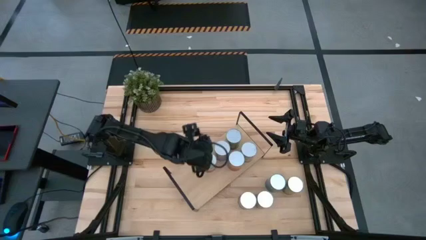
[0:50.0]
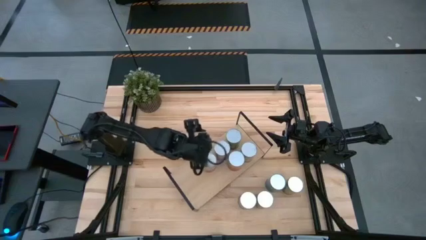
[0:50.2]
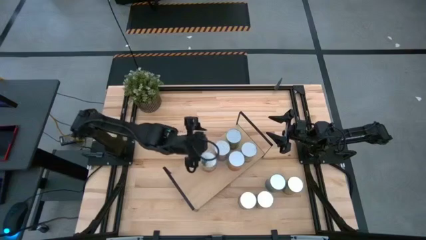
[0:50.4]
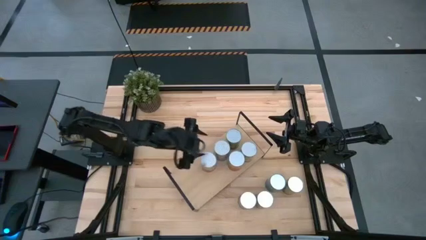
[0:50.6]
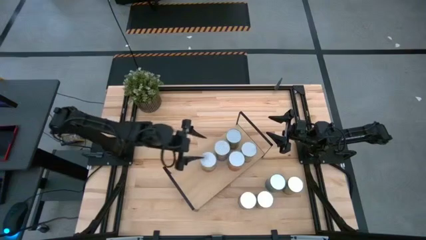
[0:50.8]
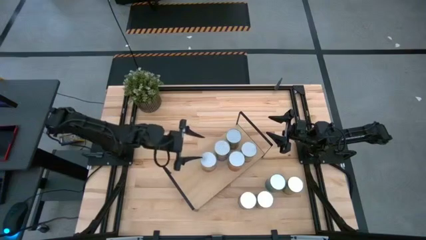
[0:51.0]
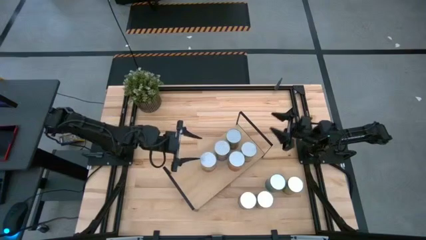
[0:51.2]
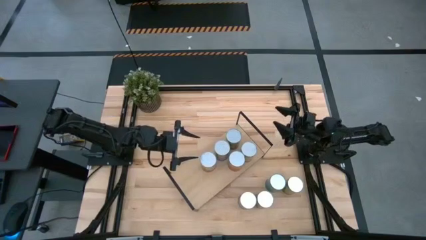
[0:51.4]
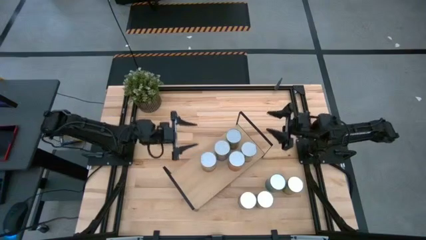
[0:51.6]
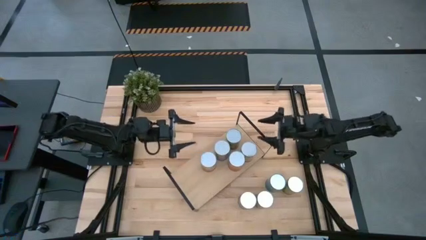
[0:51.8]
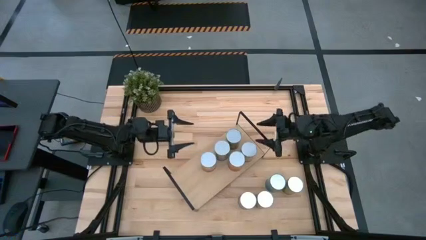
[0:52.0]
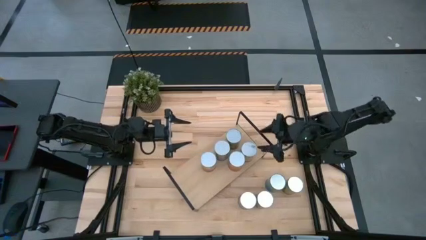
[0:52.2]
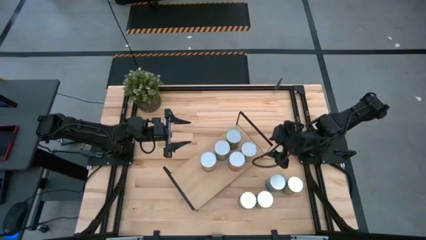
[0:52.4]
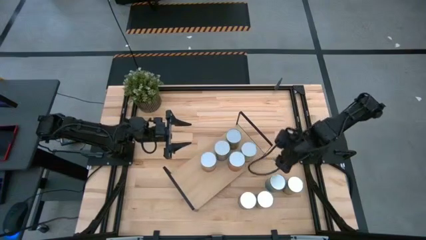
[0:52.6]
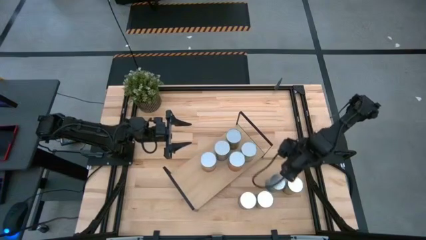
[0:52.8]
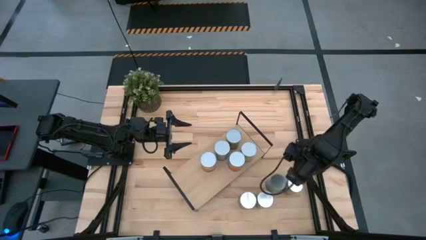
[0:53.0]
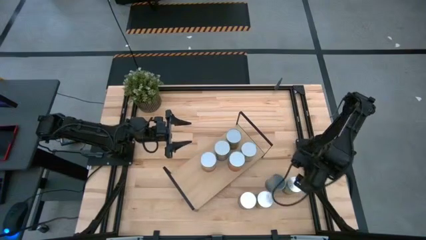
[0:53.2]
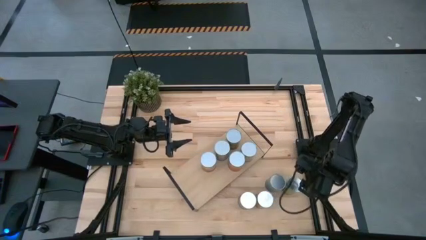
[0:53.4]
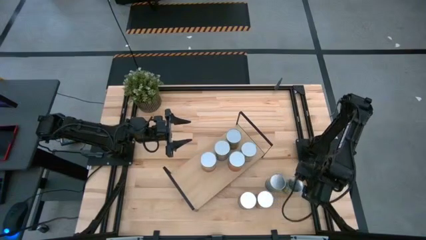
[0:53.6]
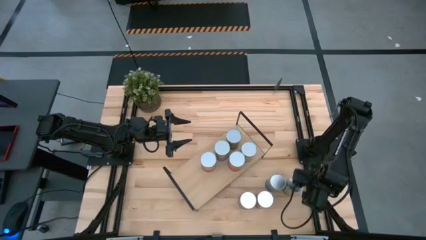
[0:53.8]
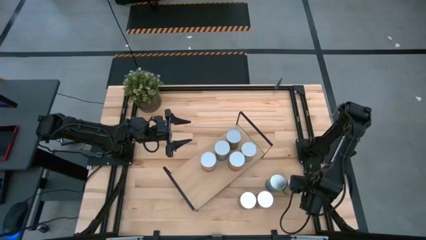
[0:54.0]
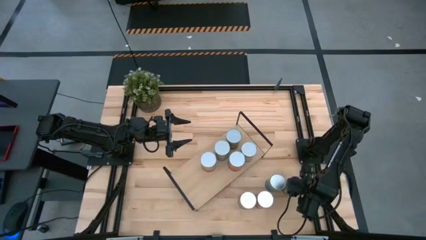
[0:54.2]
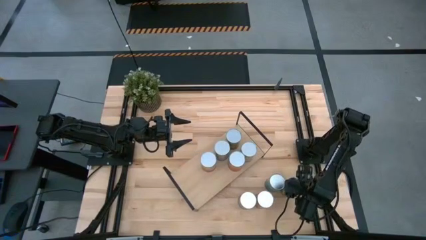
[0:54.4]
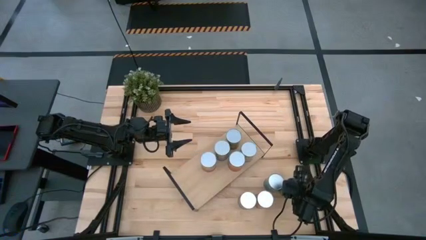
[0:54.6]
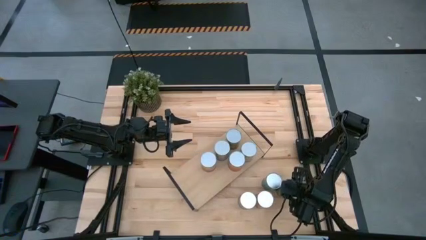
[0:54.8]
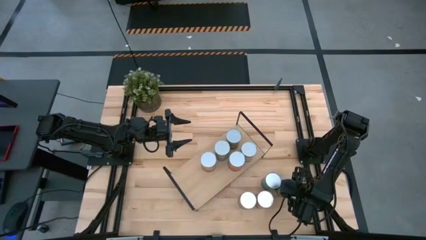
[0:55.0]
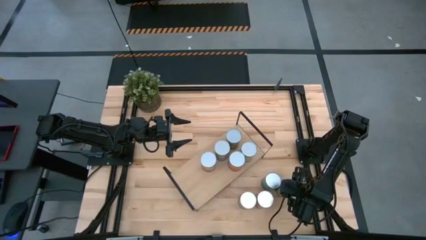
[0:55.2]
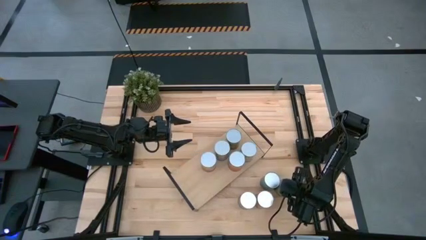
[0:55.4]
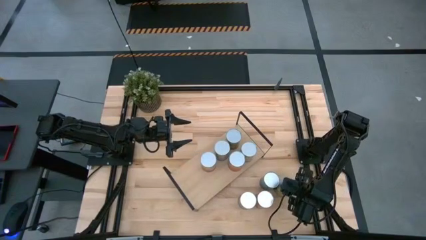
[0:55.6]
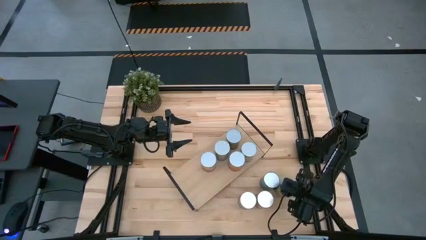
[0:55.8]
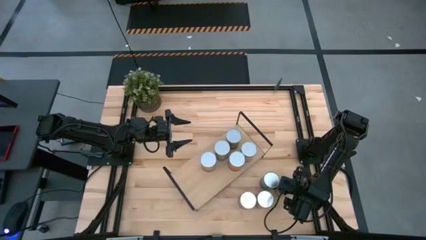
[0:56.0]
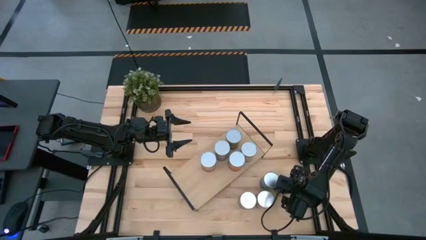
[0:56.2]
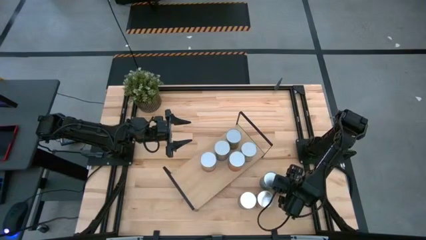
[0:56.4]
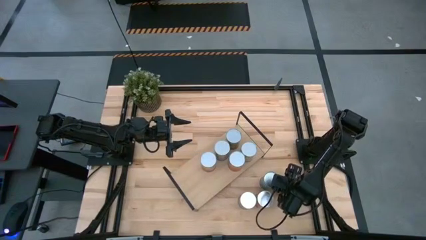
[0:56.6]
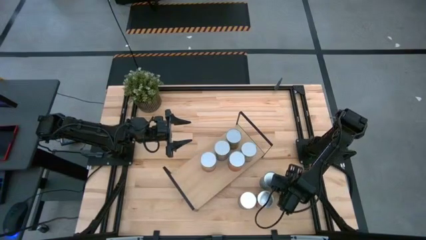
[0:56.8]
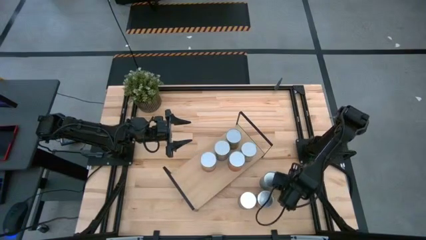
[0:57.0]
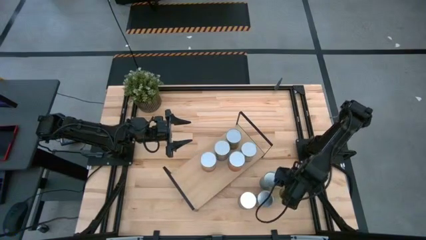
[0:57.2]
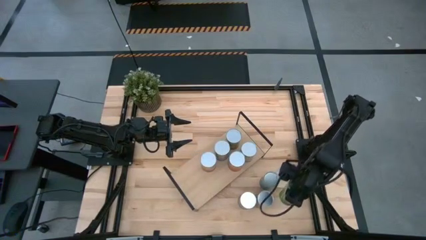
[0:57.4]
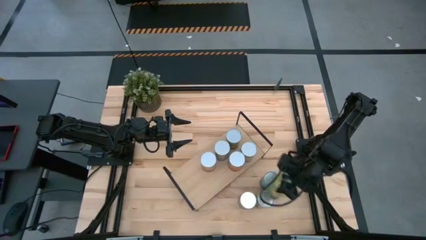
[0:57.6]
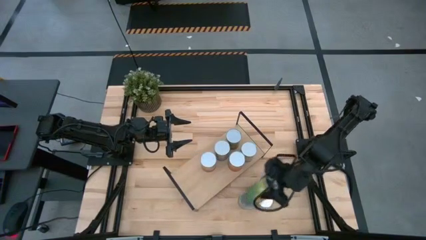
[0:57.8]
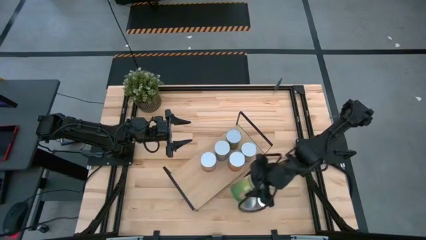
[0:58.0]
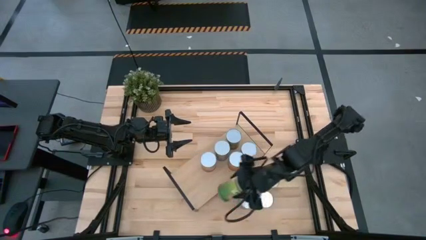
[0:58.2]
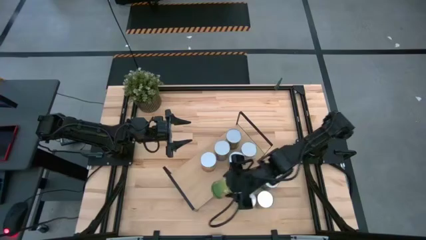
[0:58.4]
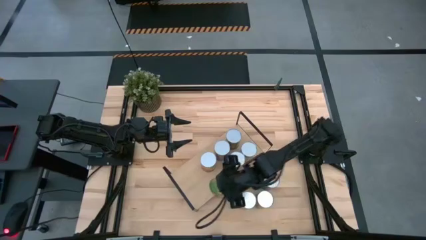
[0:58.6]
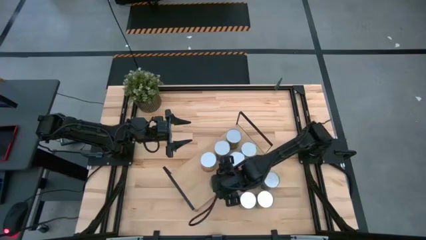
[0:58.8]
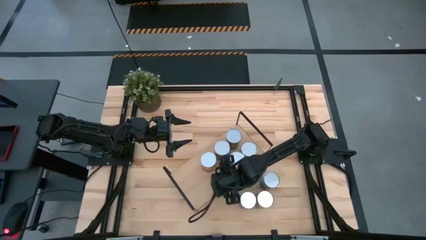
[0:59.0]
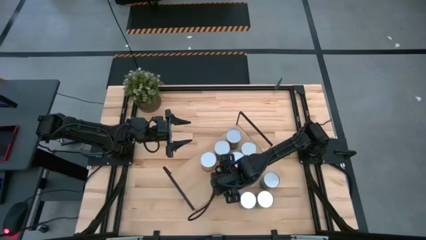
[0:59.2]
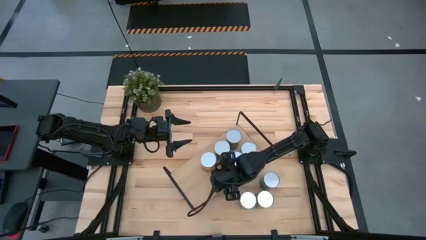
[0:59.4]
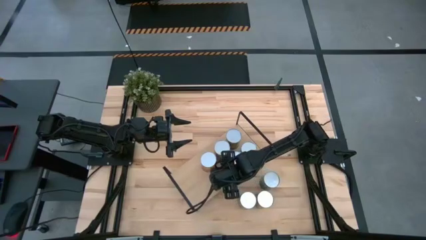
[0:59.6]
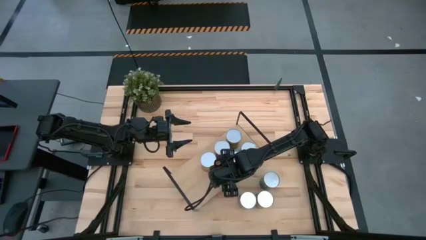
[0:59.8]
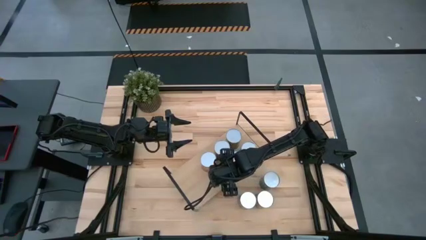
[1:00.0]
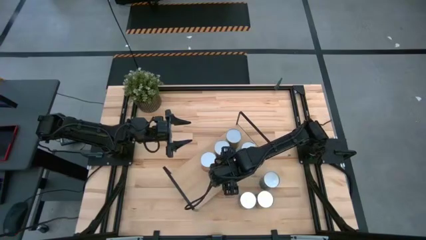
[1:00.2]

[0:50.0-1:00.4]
Task: Pick and place cans onto a shelf
Put the canned oranges on the shelf

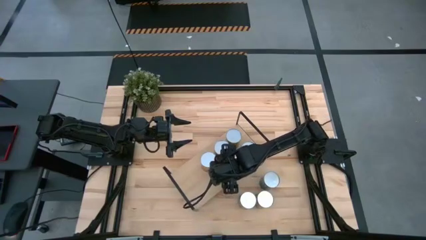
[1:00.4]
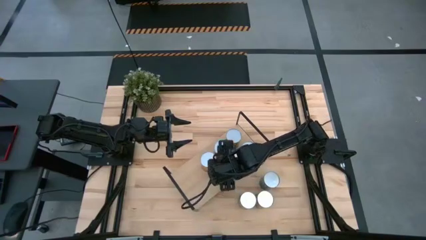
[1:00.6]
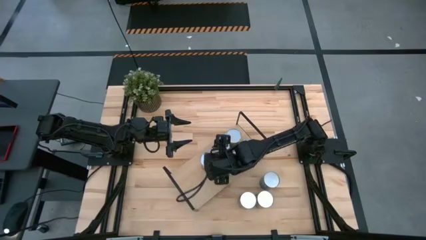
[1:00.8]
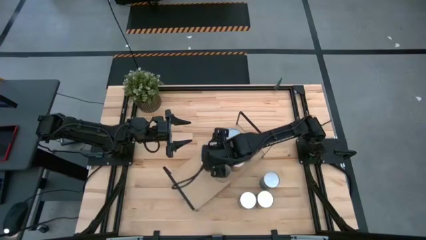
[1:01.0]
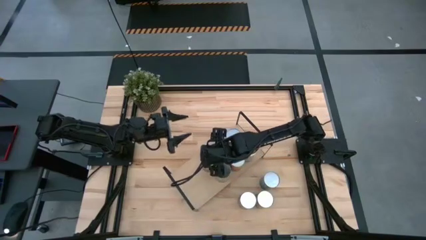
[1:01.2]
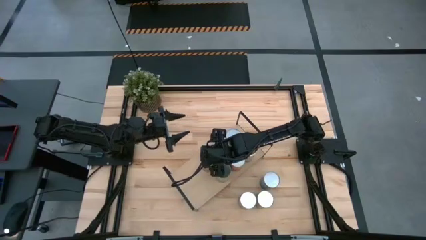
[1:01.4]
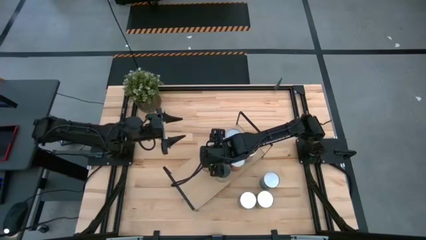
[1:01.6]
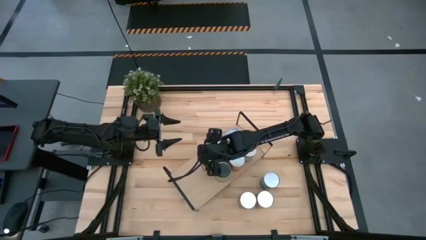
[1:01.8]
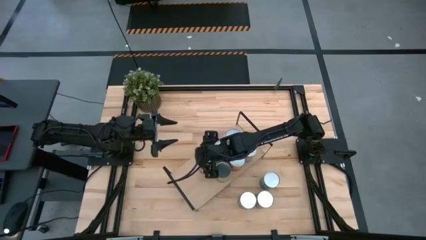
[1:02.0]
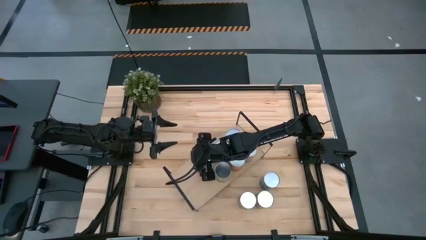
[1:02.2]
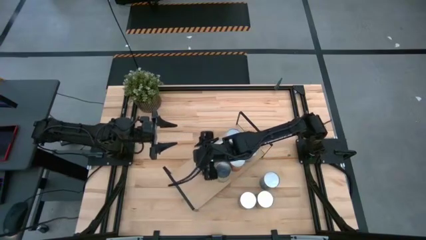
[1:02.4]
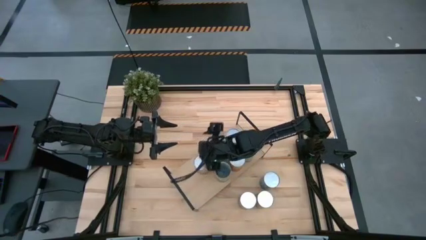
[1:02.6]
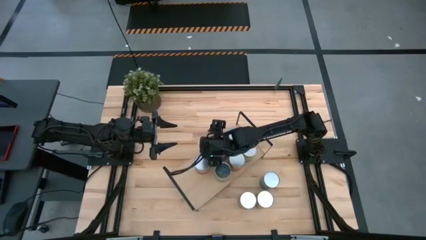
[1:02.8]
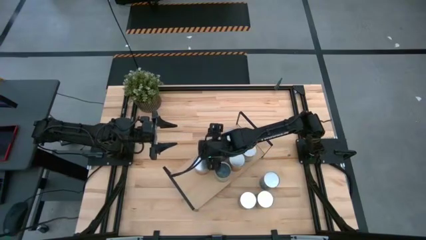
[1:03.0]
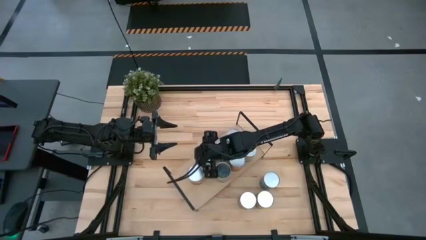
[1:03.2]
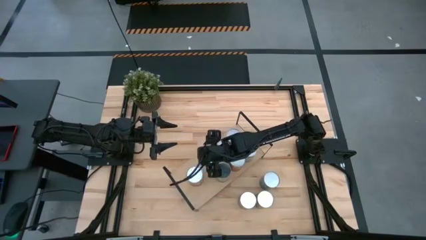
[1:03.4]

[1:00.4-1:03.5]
Adjust the canned corn on the shelf

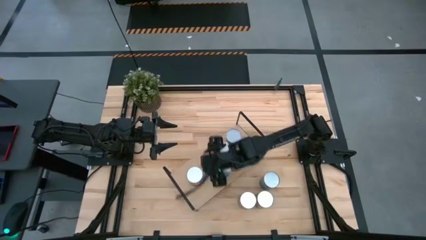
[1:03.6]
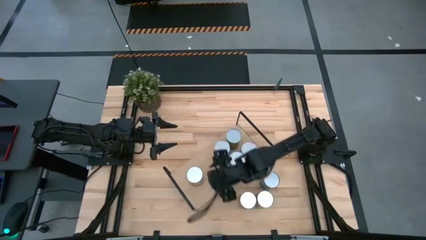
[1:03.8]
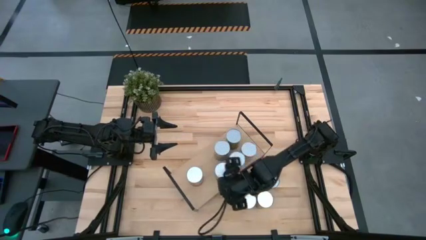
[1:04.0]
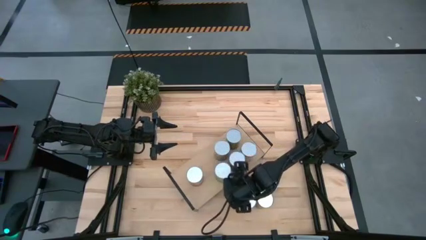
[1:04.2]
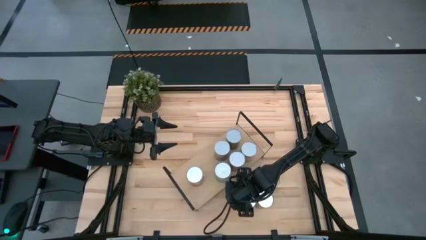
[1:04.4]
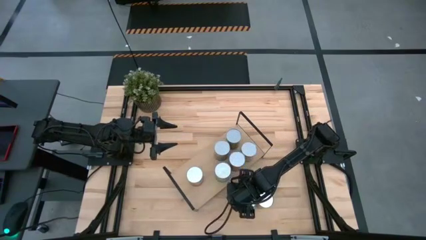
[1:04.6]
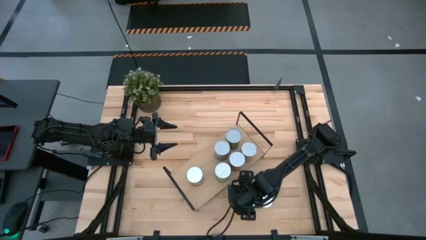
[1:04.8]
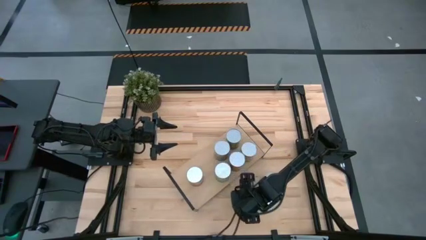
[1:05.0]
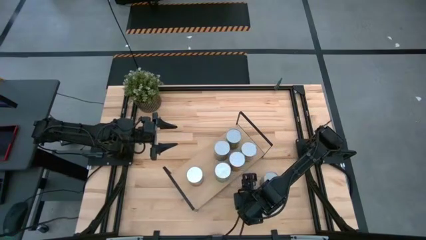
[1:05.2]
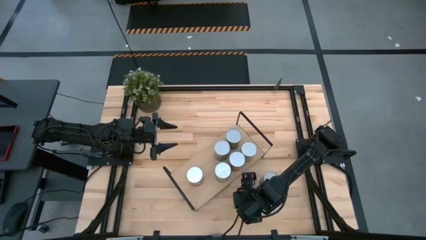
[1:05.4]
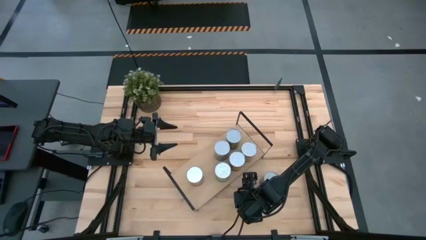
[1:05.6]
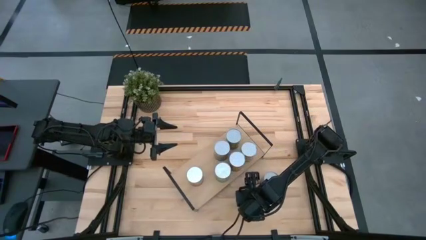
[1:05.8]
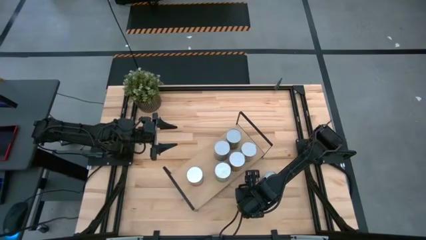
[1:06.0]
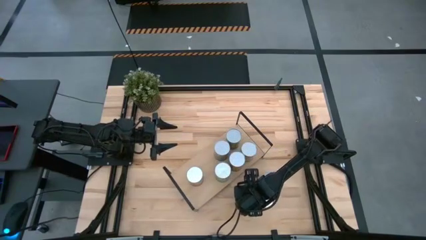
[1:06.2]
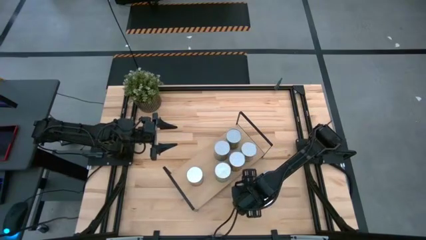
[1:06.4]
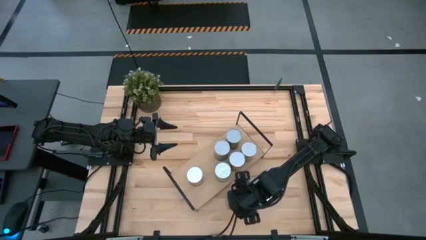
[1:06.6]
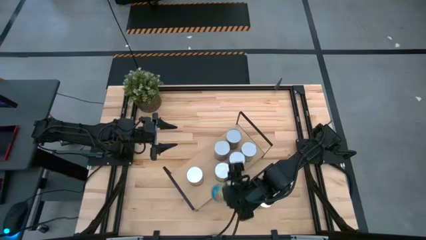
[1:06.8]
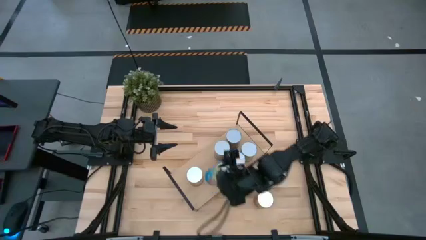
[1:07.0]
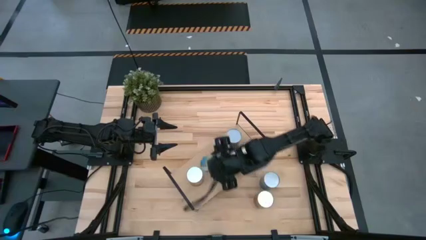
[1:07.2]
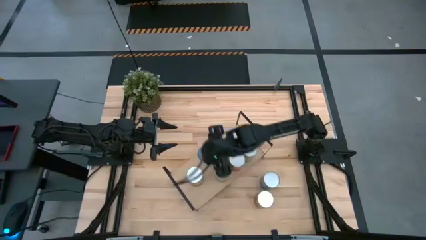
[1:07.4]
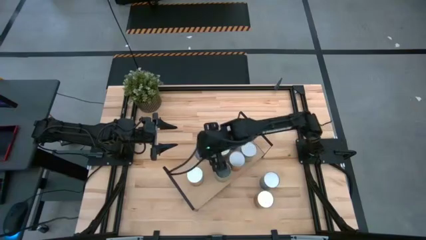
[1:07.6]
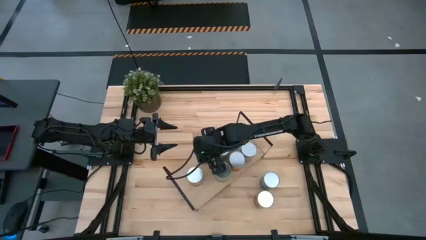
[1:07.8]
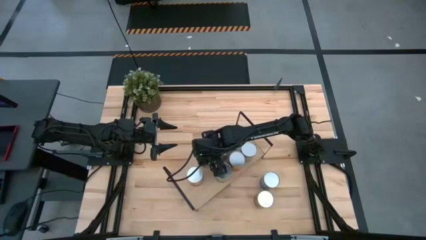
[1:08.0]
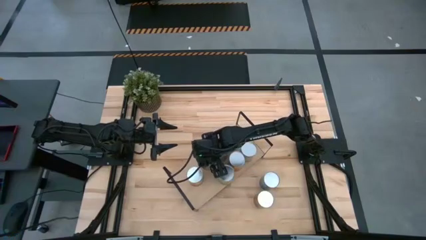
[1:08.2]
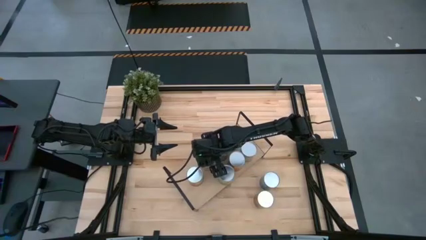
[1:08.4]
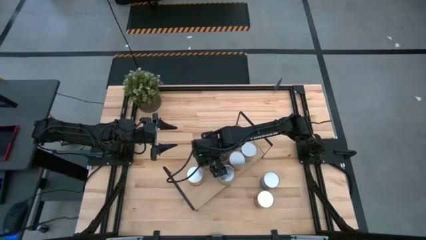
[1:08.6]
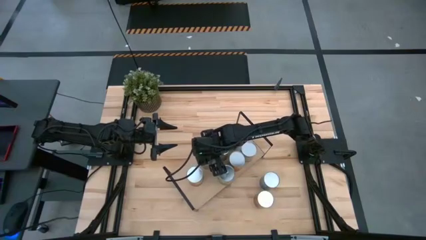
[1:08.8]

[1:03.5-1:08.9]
Put the canned tomatoes on the shelf
